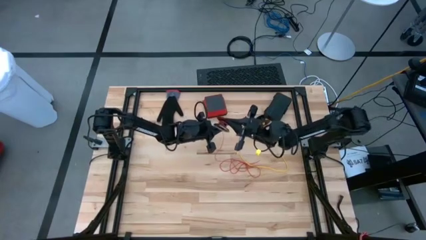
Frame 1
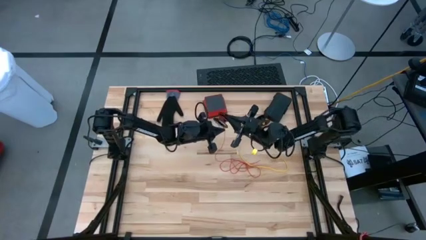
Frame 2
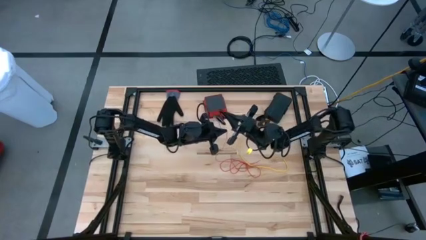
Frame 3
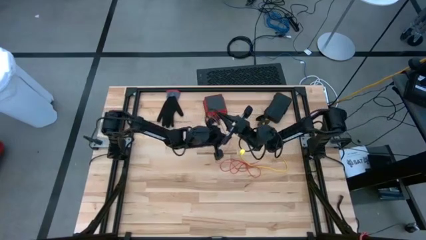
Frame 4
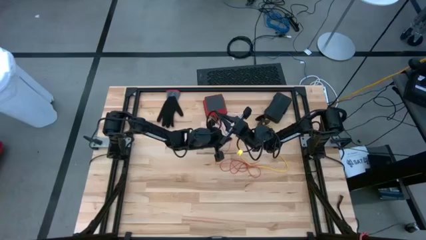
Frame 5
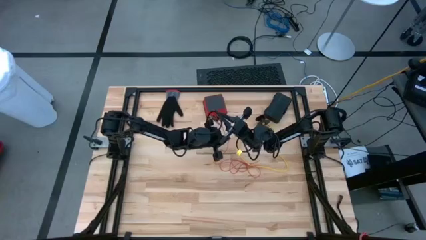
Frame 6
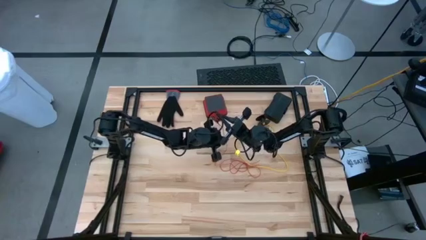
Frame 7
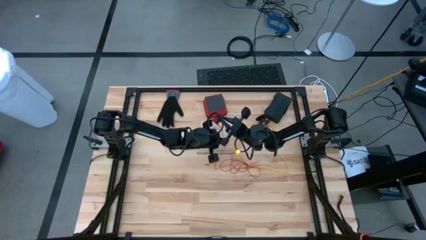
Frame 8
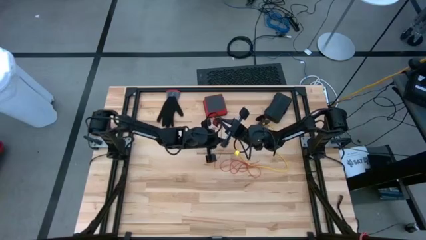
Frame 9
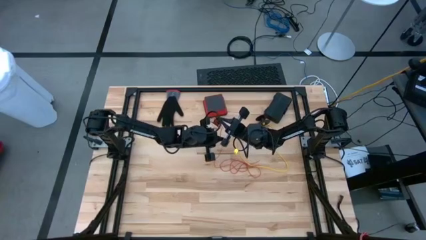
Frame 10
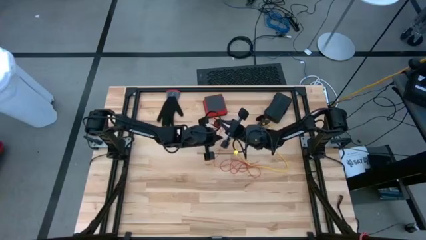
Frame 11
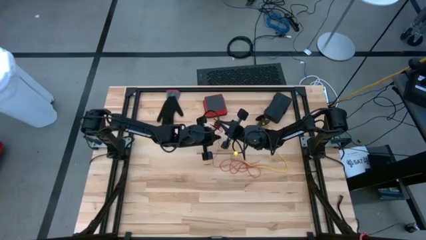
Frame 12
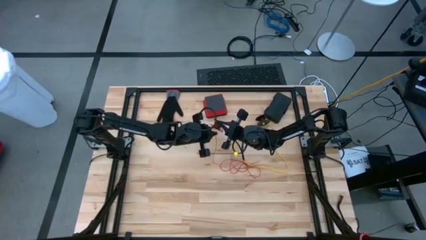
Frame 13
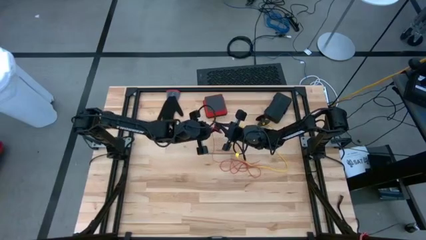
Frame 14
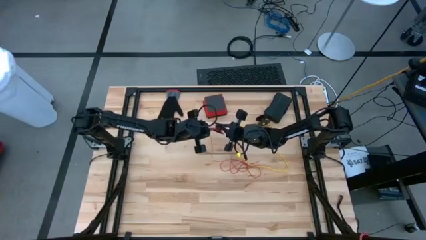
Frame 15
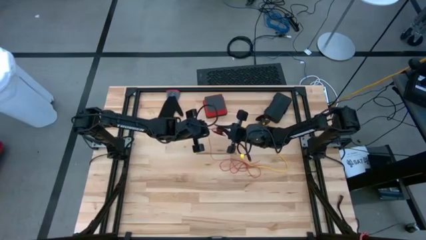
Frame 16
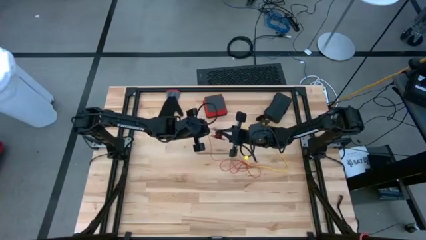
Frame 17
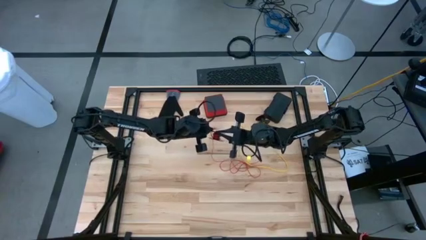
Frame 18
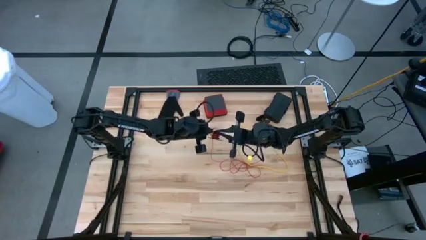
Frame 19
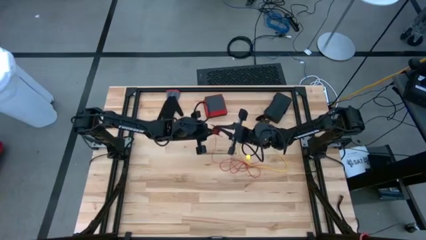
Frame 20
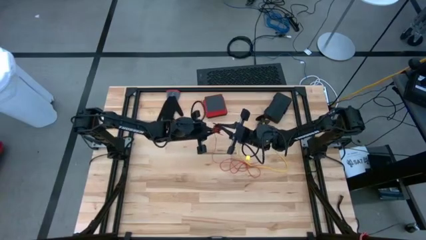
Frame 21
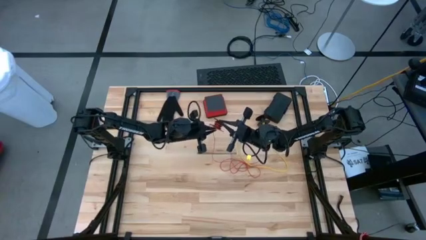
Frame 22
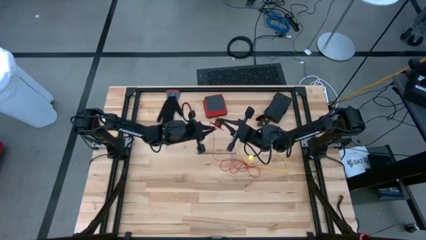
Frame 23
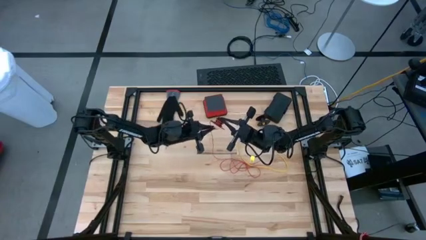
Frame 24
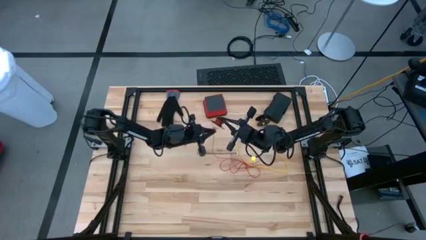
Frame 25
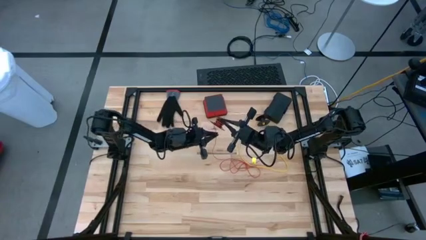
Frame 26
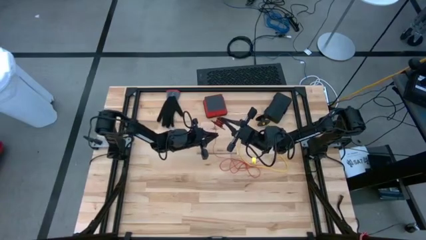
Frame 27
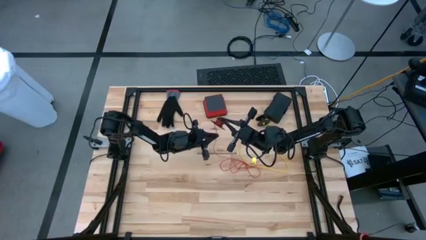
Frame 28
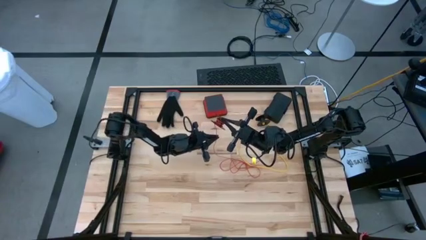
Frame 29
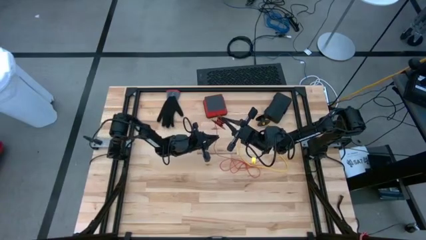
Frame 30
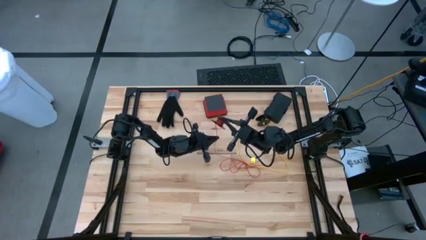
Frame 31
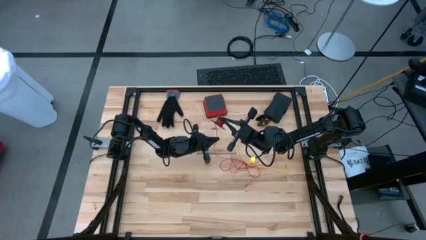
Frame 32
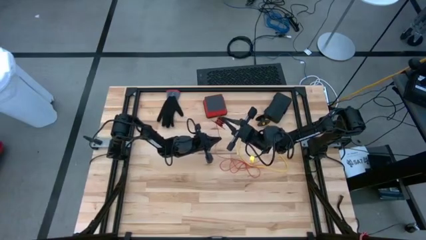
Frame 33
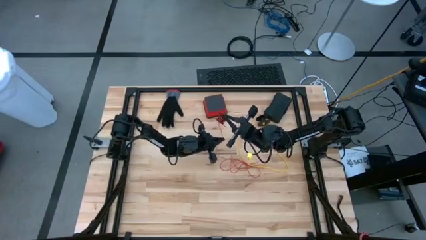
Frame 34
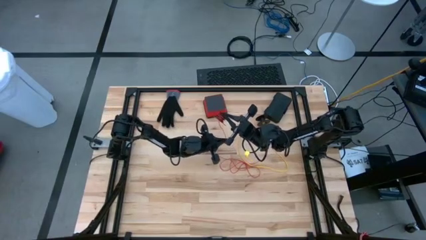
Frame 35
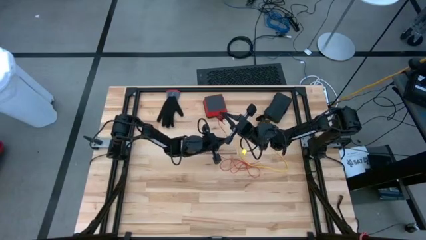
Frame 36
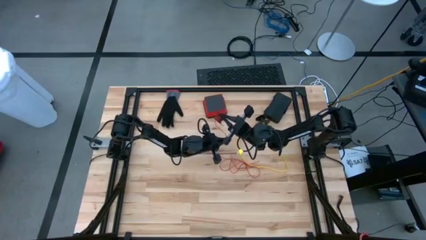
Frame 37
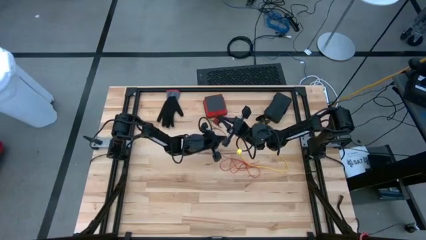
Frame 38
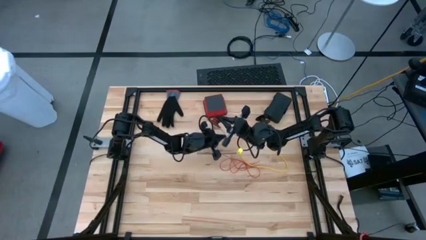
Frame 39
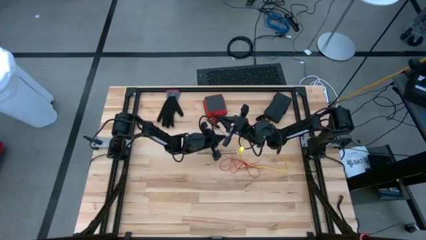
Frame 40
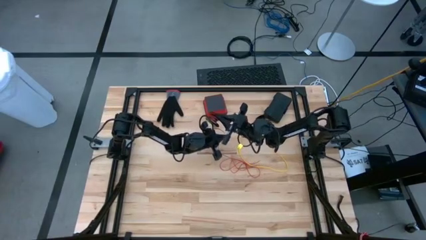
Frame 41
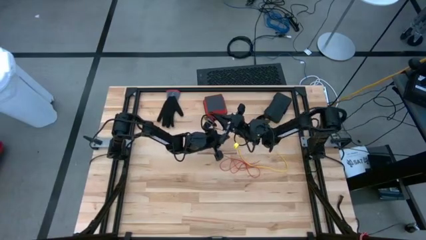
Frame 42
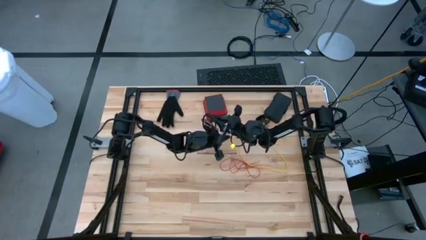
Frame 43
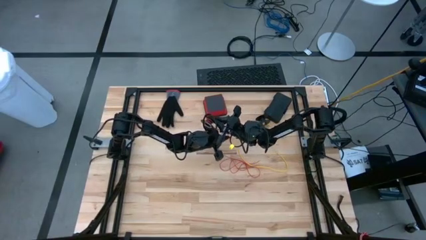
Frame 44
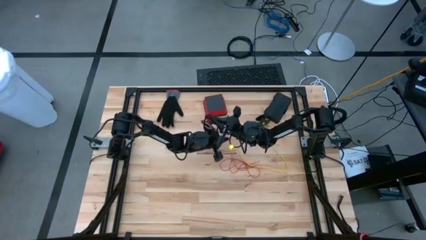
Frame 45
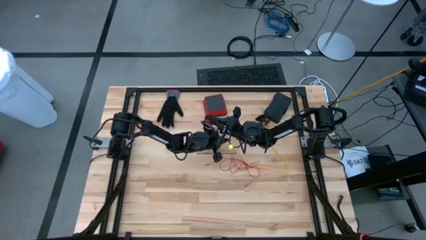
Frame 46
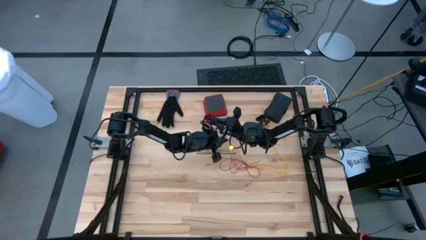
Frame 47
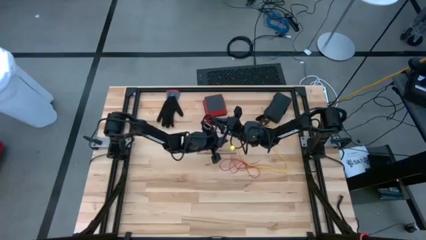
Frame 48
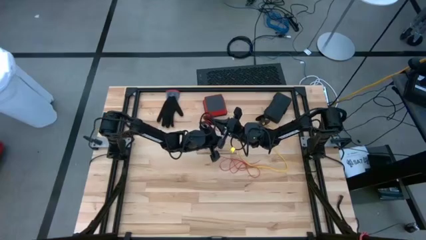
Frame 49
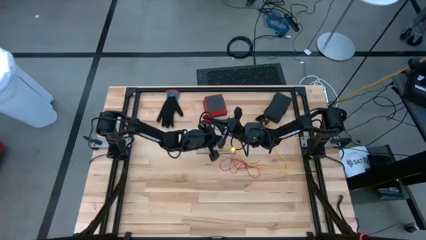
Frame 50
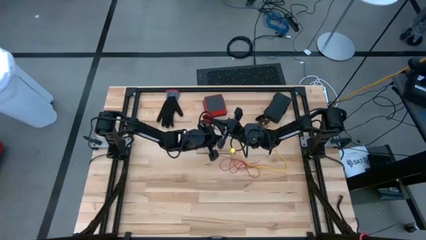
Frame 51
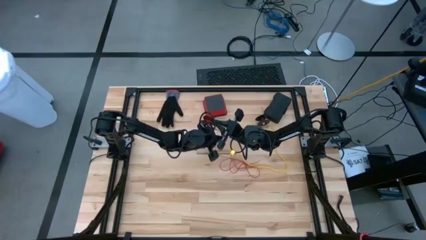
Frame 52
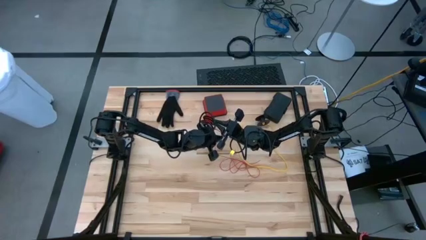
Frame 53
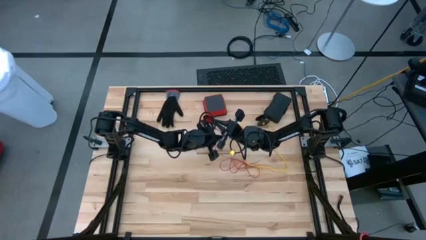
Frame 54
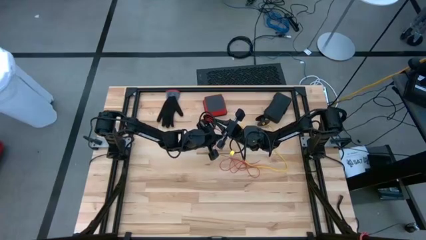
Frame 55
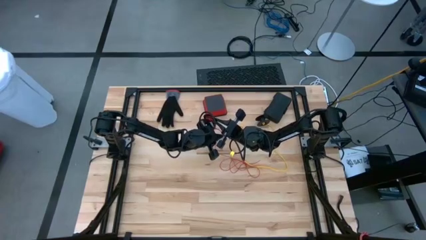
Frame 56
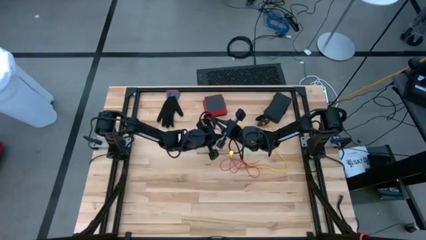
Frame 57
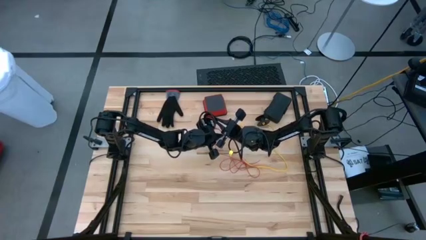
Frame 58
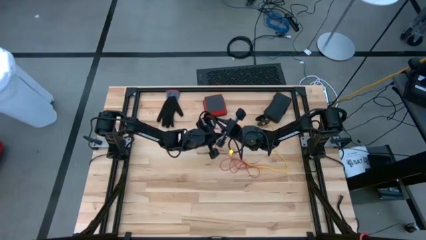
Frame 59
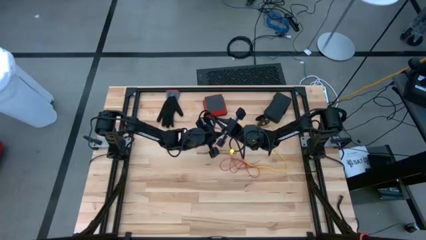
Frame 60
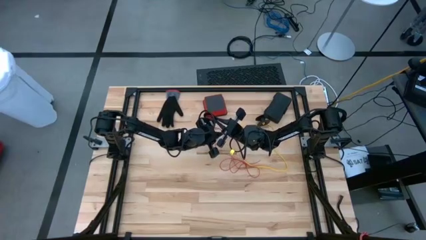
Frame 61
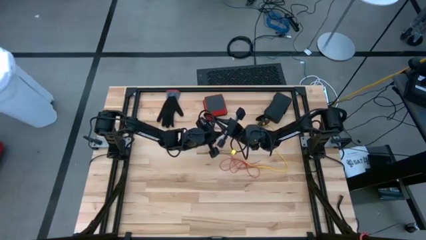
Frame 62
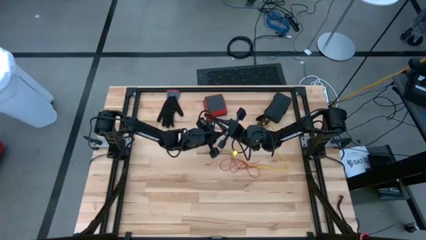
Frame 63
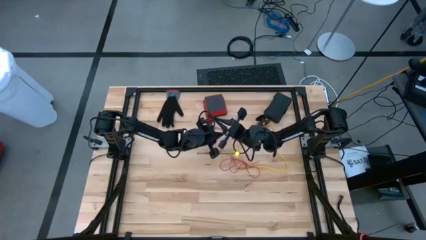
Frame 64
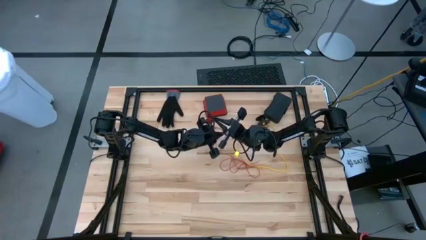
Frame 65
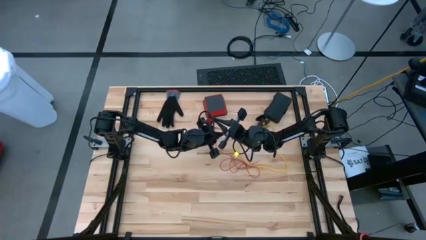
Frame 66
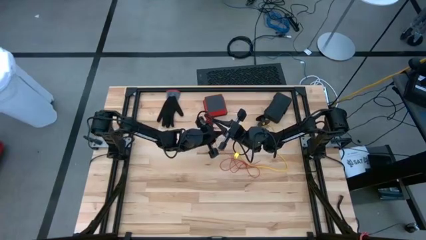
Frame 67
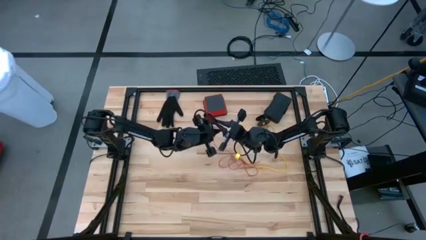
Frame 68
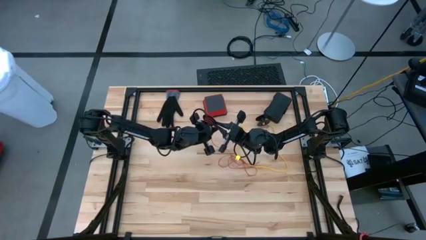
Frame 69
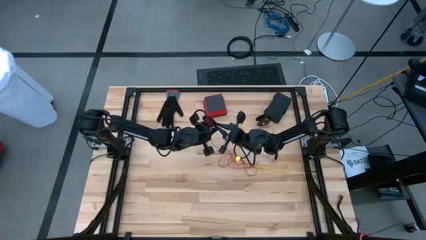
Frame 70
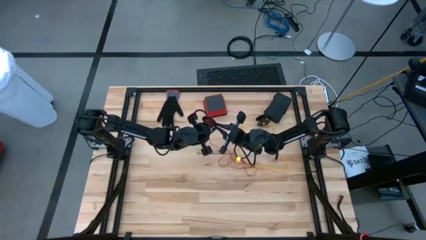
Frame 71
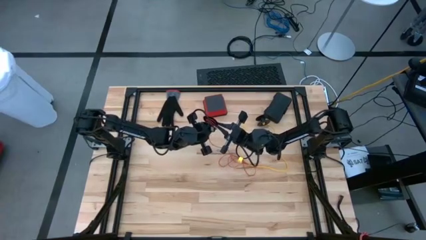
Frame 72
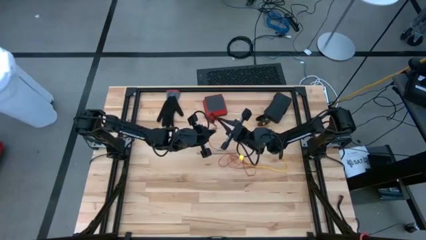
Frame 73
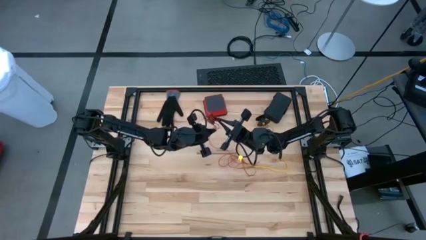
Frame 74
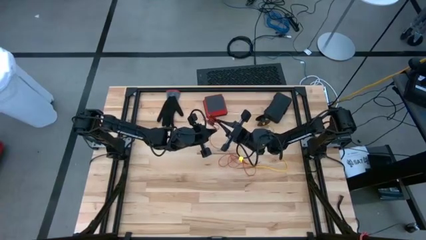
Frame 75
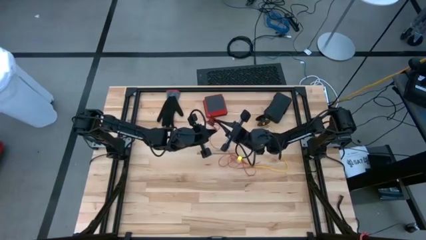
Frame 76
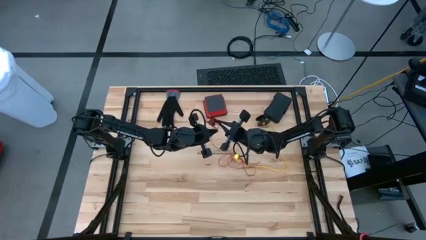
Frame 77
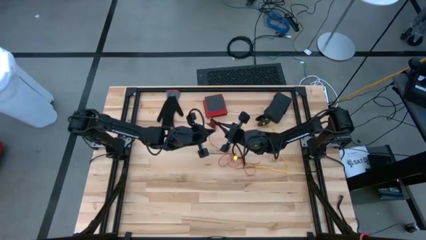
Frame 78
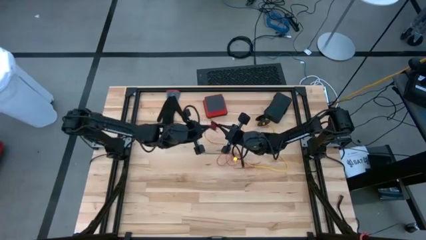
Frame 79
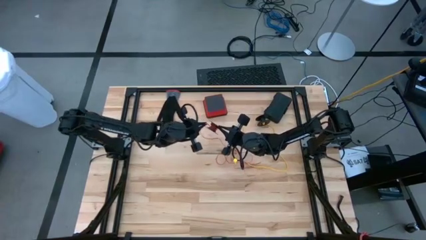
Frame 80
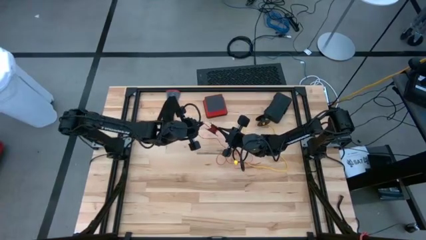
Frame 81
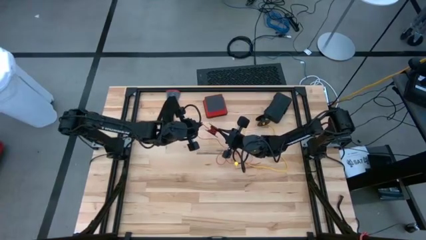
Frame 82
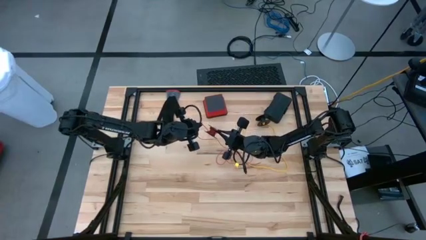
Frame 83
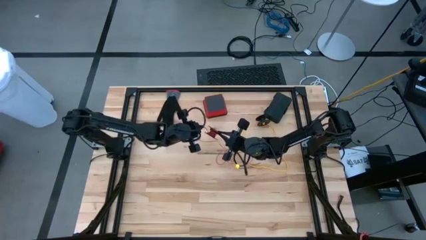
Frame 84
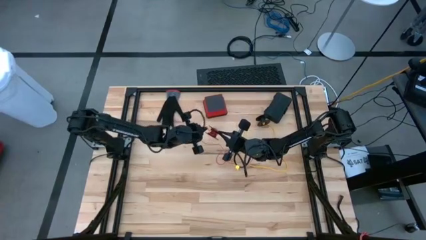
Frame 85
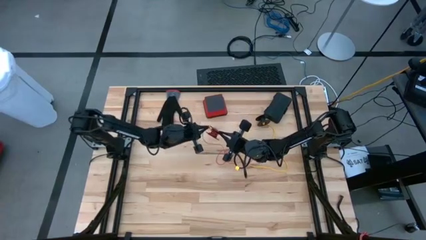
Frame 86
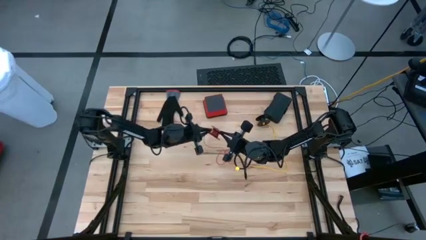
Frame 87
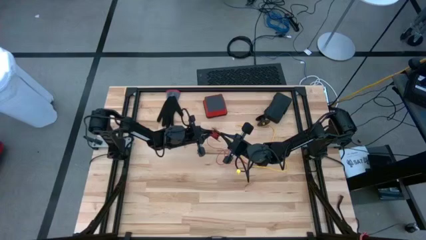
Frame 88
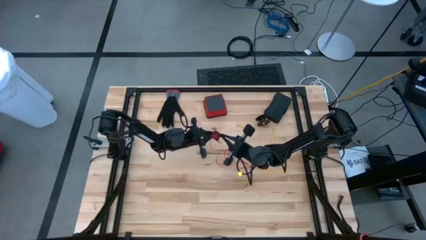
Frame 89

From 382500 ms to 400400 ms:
Task: Coil cords
Coil the red wire onto the spool
